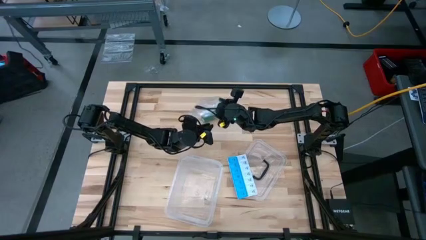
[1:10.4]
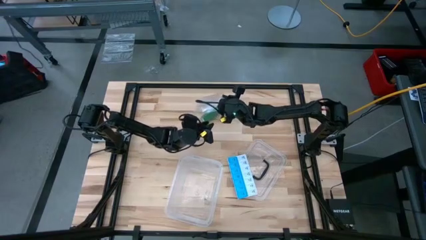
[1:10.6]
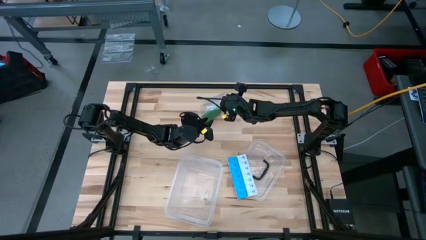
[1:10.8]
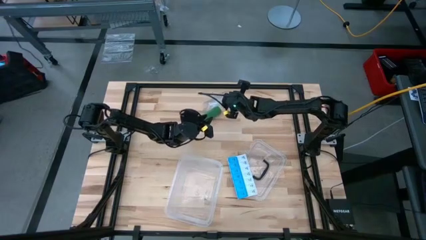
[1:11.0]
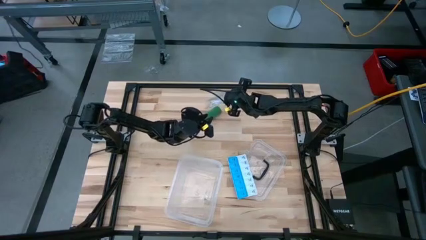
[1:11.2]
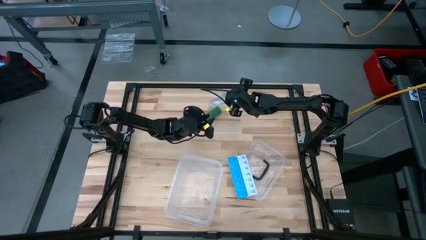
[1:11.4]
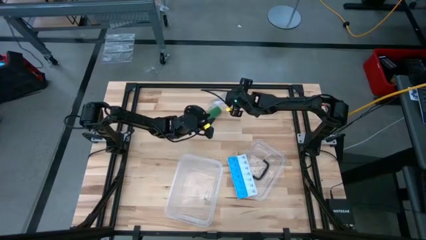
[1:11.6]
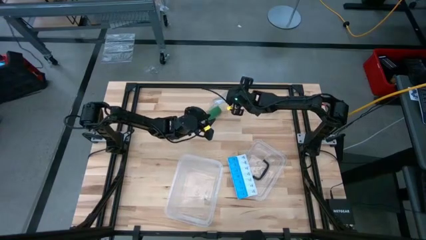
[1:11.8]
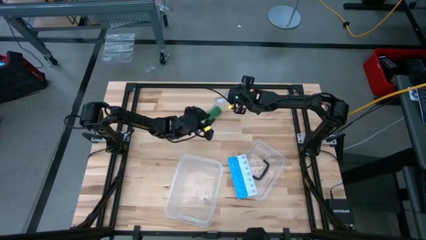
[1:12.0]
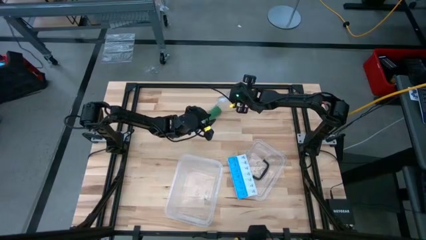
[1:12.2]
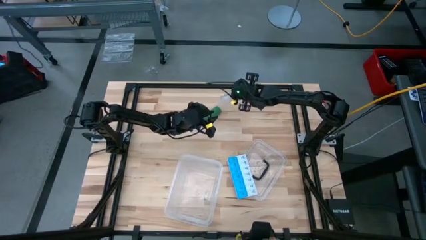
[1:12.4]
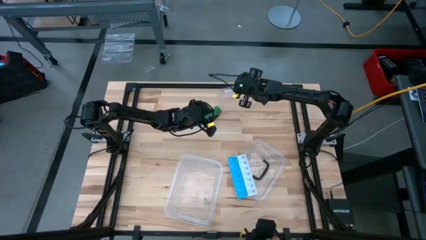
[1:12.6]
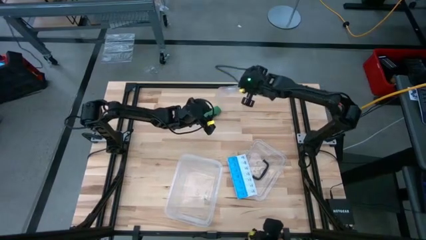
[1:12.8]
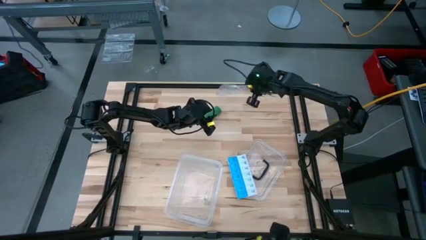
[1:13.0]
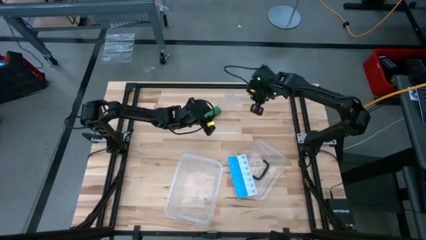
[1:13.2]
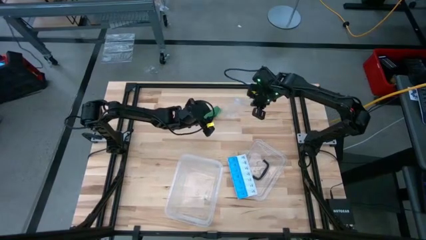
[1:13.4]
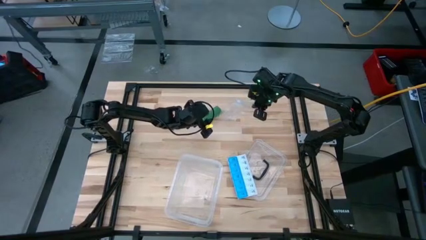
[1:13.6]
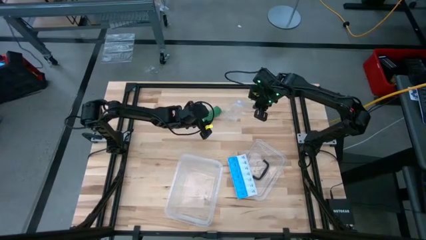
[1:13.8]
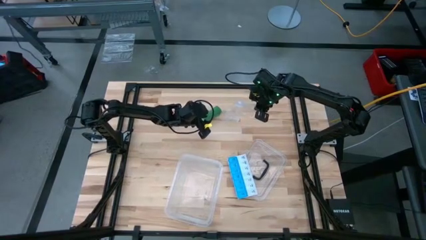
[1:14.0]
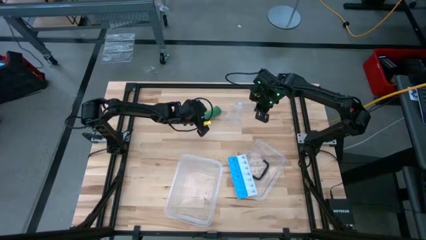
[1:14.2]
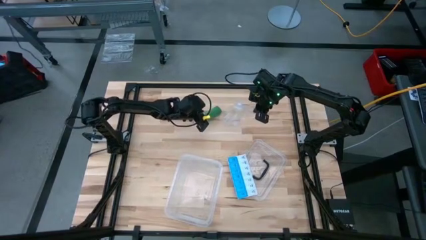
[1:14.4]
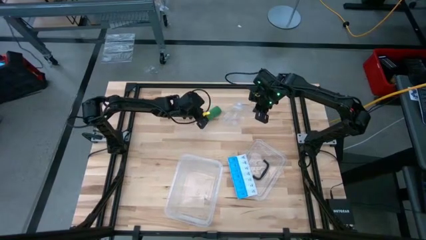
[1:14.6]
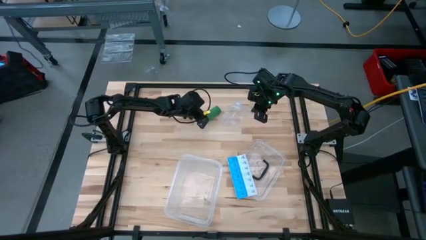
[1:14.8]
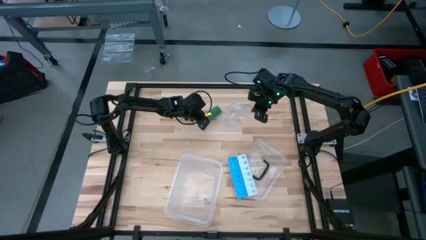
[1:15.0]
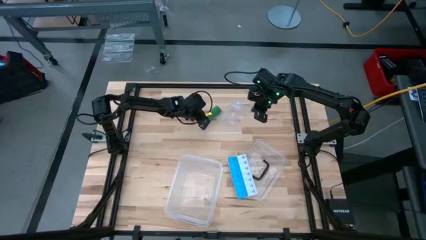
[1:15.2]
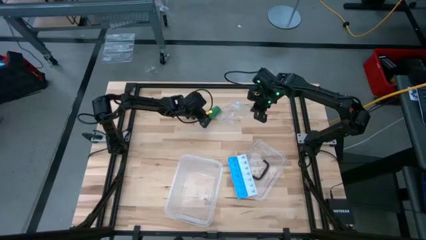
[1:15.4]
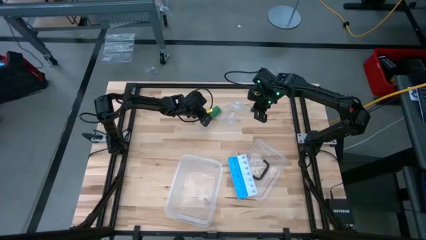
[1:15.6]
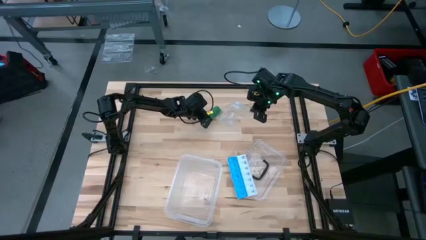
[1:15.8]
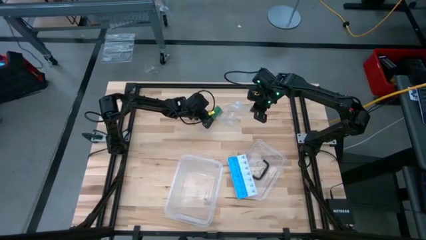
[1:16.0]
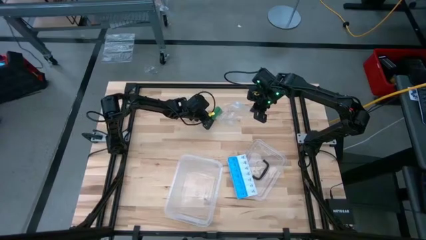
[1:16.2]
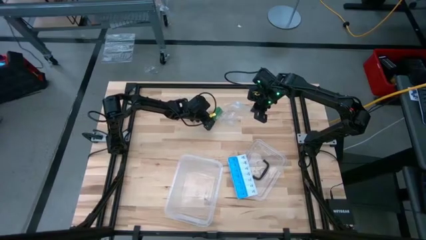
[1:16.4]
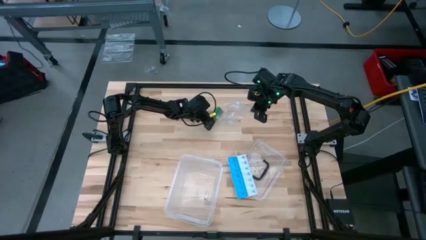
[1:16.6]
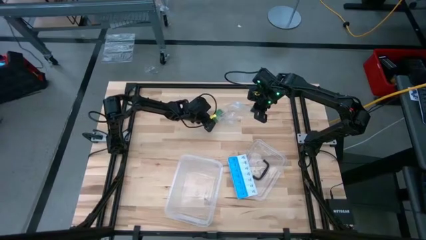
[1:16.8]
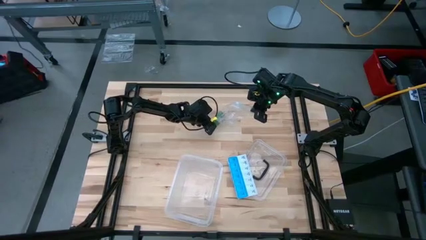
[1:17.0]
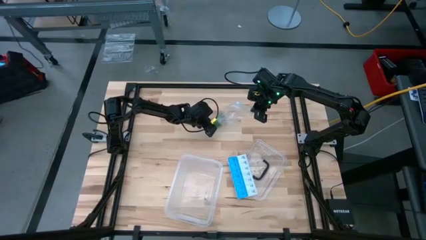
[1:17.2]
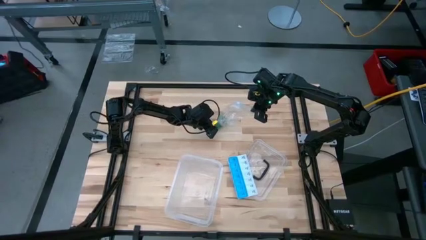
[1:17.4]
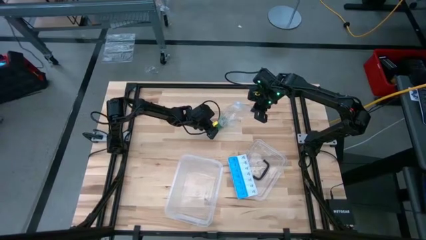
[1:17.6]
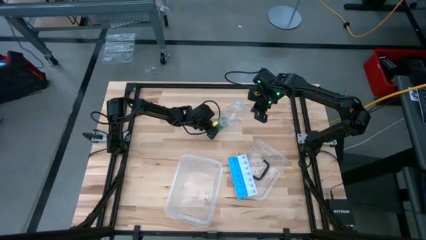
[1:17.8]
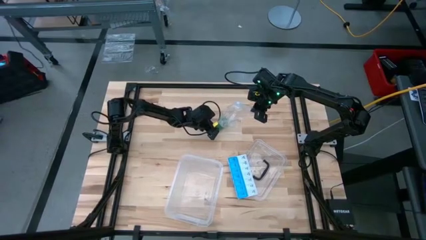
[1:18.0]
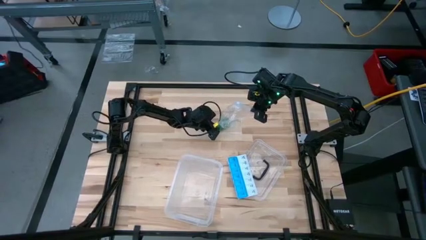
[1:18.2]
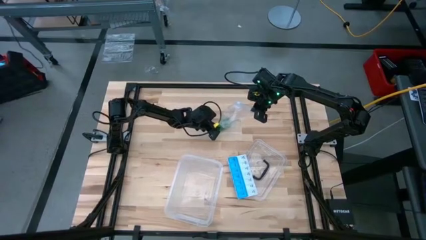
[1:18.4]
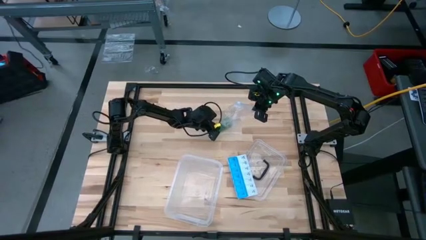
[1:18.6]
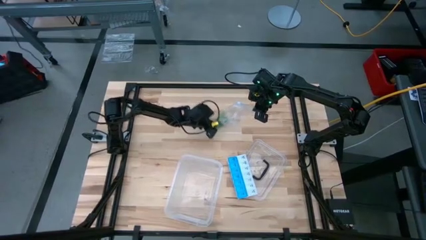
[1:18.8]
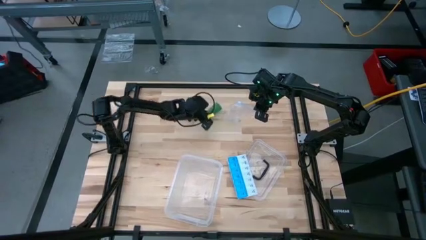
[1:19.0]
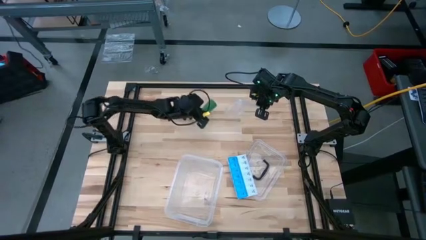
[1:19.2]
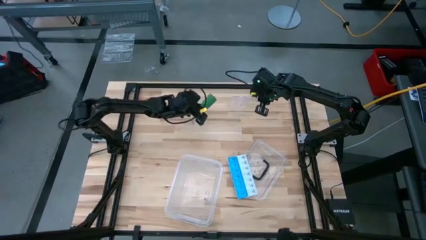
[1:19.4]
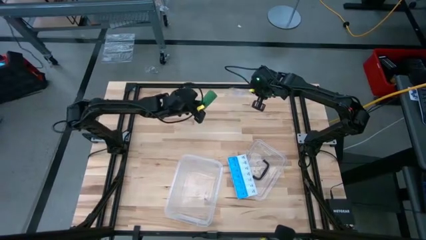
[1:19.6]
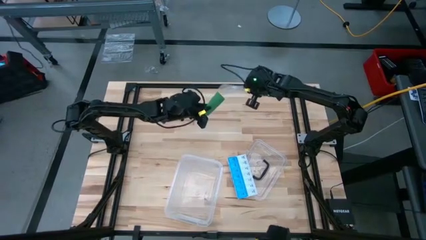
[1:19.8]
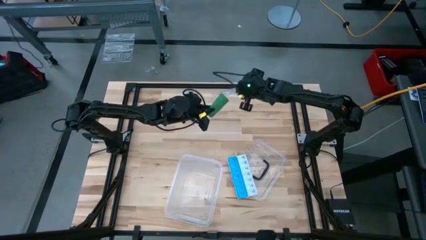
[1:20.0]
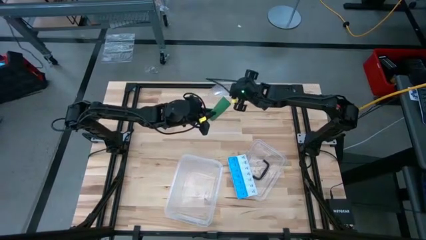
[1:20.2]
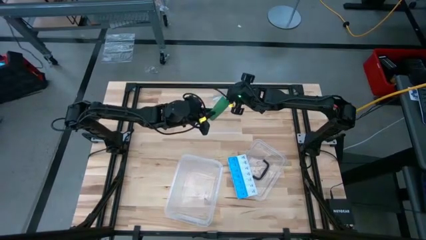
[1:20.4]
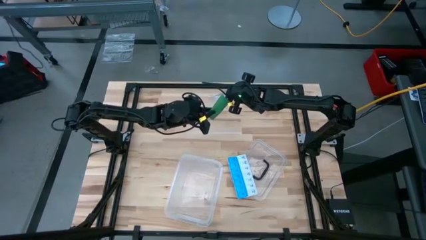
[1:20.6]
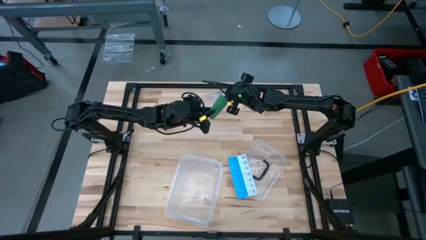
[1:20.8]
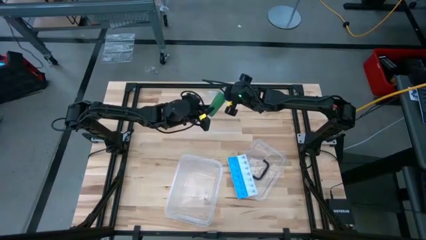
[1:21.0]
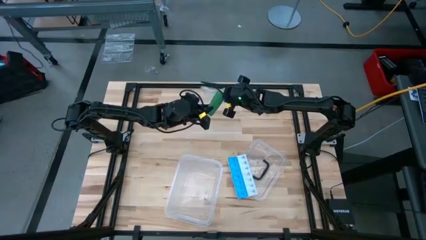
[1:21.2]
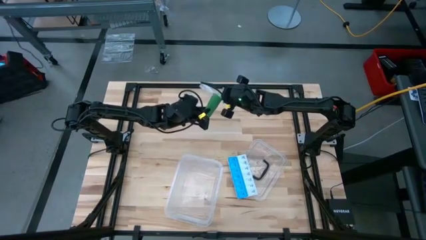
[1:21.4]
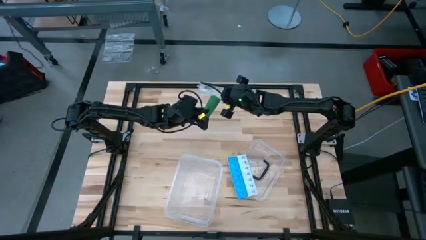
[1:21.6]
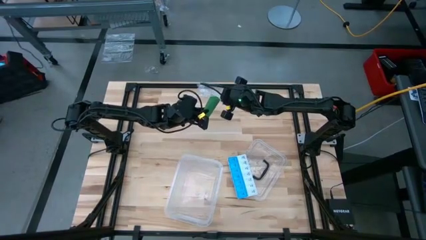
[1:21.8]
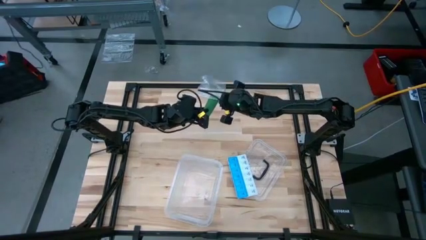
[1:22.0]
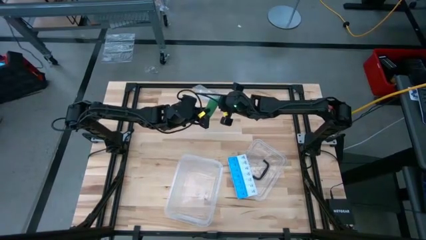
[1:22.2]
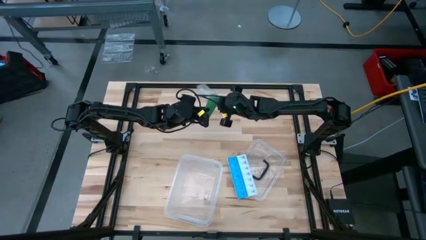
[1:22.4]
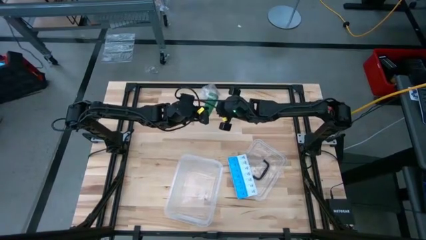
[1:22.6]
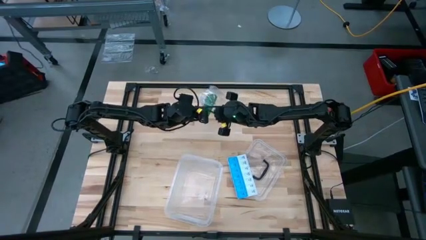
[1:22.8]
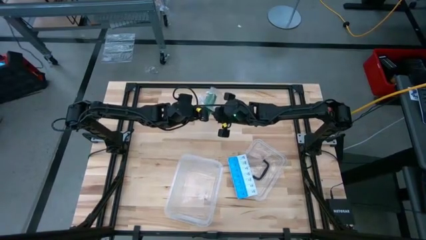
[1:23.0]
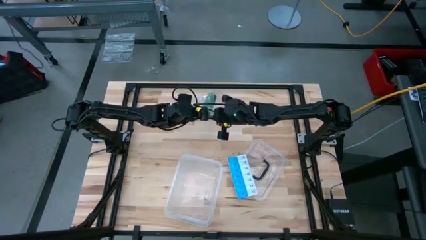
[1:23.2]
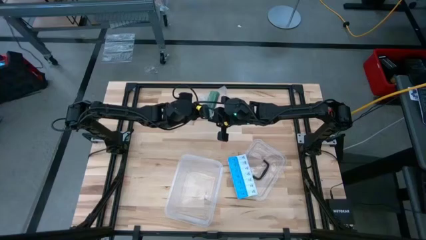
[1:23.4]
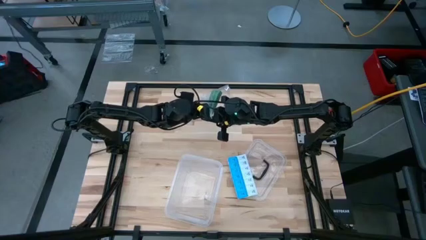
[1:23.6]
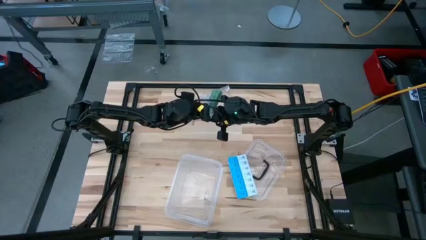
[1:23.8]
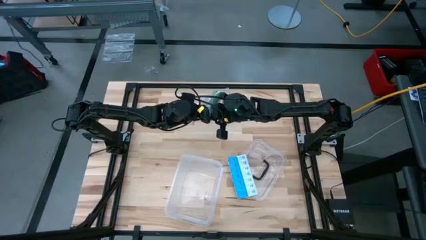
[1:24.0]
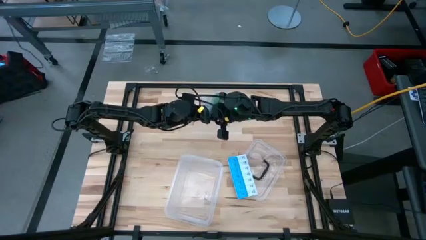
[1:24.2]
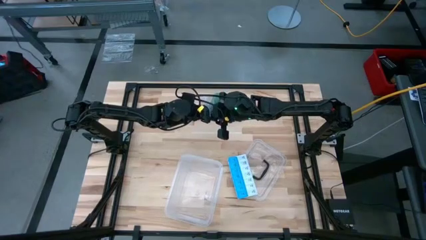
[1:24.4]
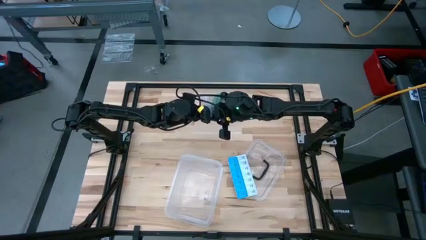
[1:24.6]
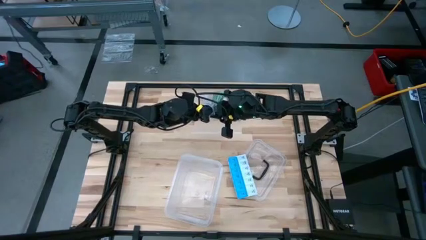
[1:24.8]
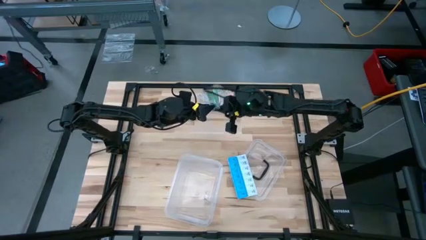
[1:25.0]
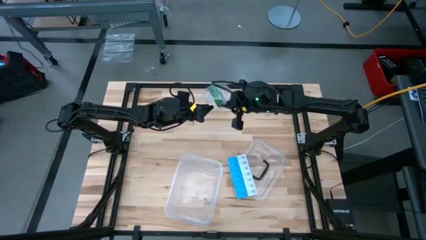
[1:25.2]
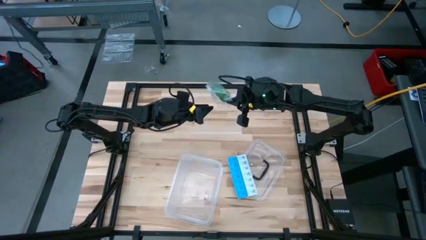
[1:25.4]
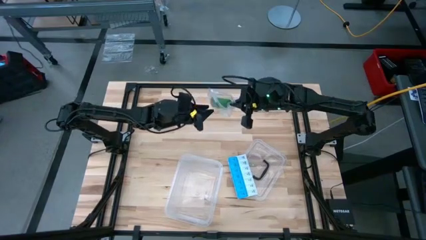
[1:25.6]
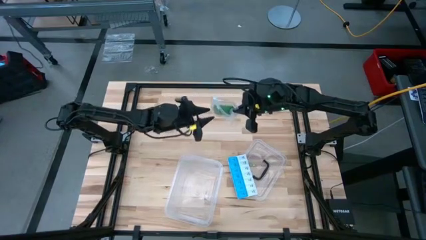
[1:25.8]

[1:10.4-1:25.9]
Task: Roll bandage
Put the green bandage into the transparent zip bag
